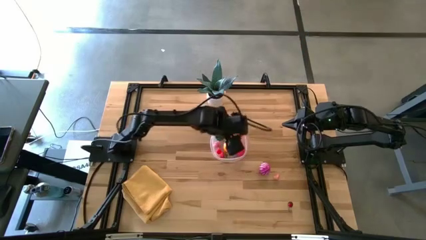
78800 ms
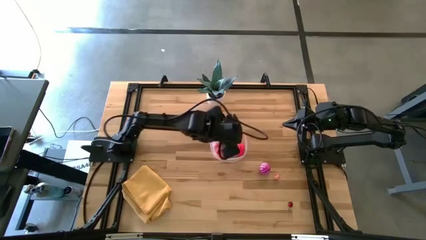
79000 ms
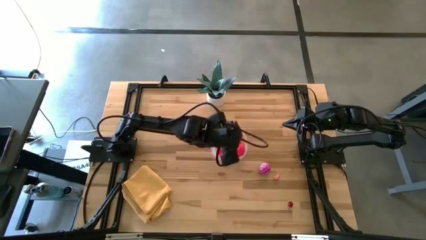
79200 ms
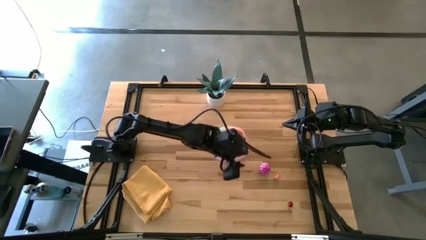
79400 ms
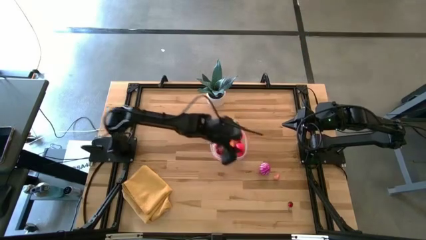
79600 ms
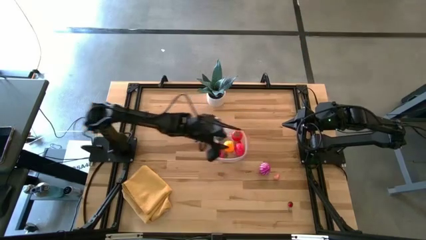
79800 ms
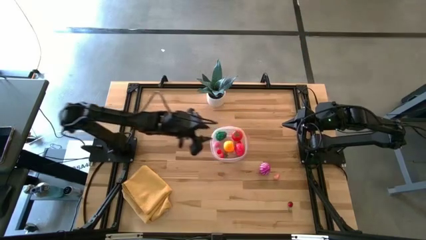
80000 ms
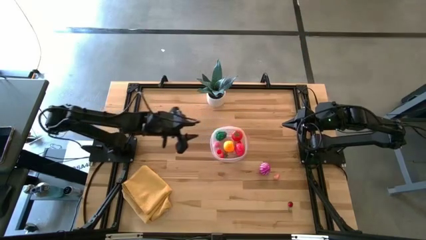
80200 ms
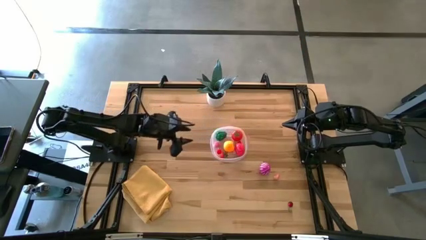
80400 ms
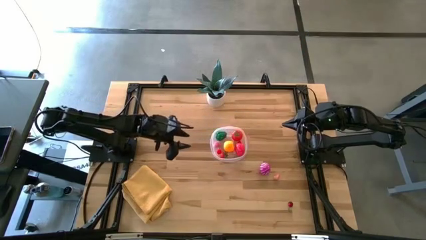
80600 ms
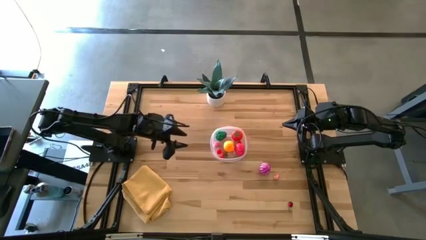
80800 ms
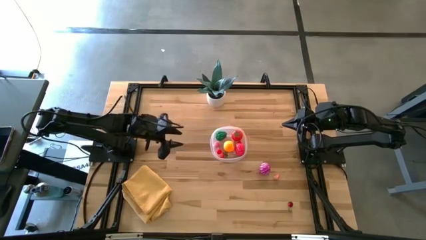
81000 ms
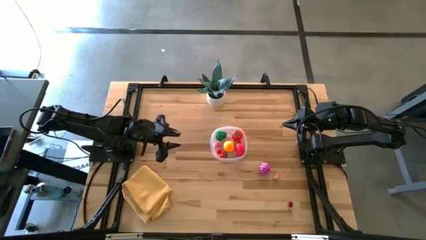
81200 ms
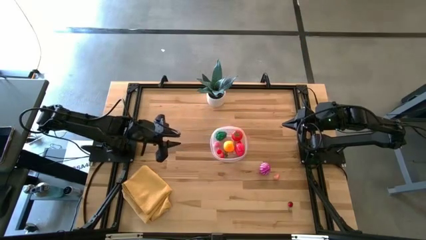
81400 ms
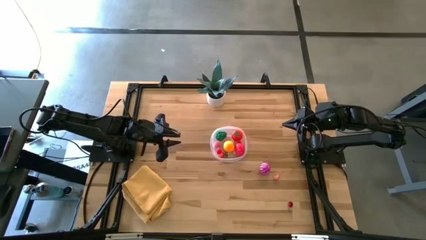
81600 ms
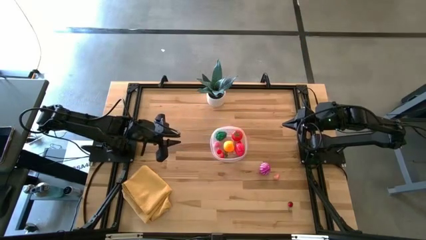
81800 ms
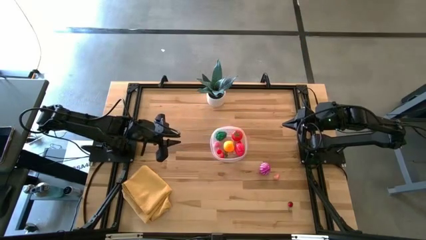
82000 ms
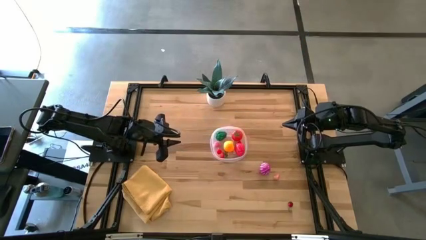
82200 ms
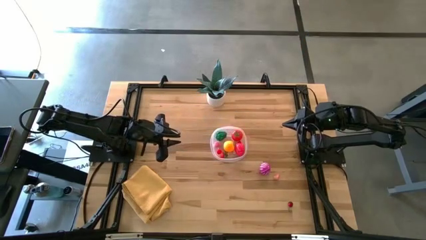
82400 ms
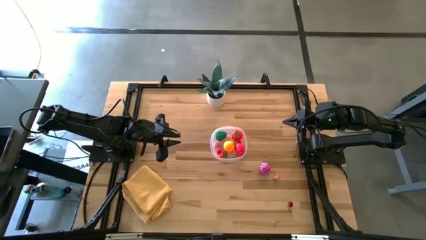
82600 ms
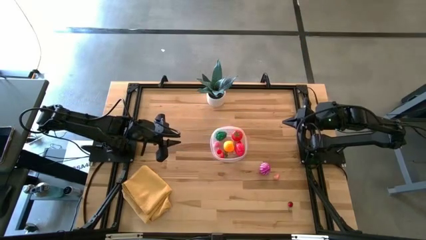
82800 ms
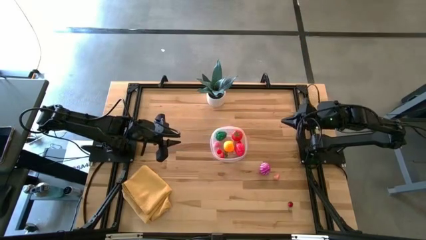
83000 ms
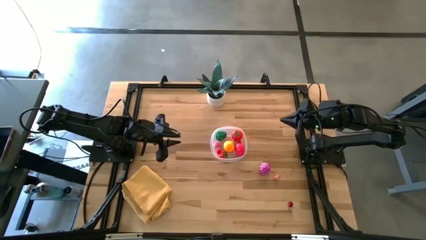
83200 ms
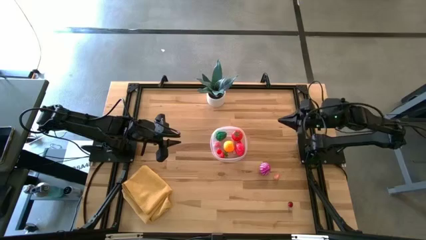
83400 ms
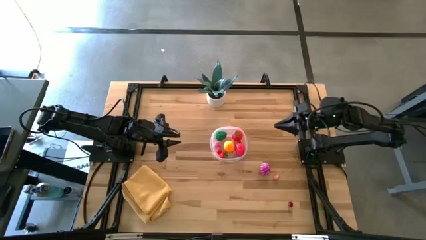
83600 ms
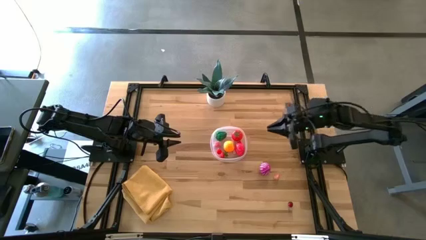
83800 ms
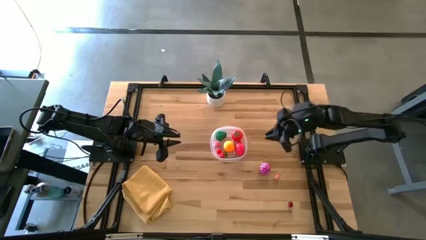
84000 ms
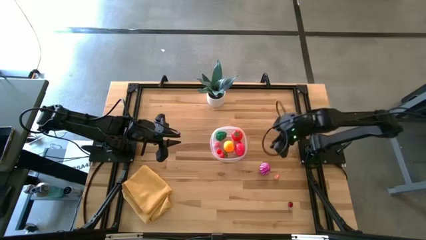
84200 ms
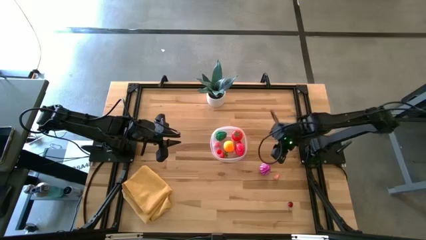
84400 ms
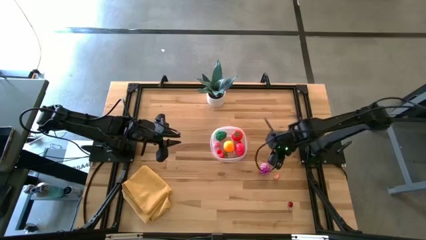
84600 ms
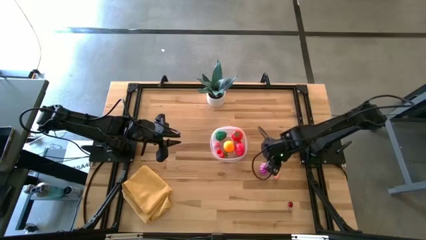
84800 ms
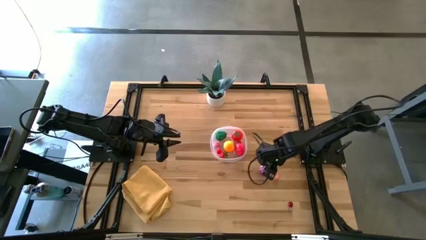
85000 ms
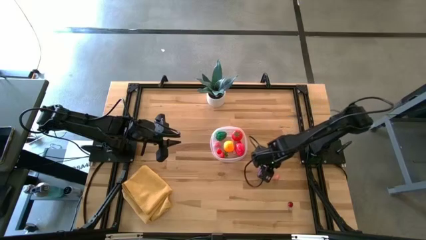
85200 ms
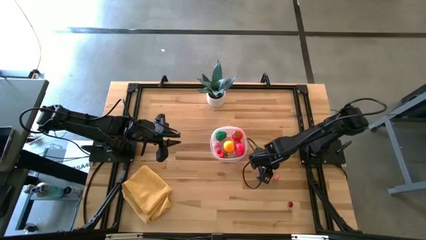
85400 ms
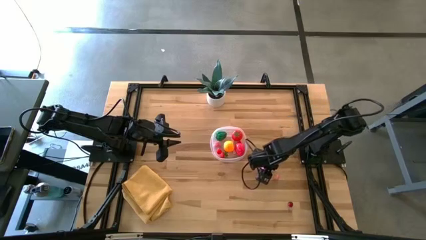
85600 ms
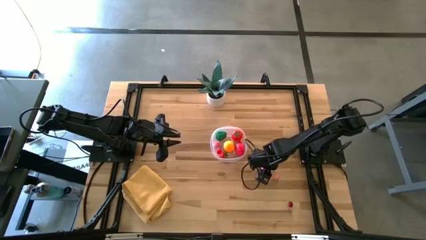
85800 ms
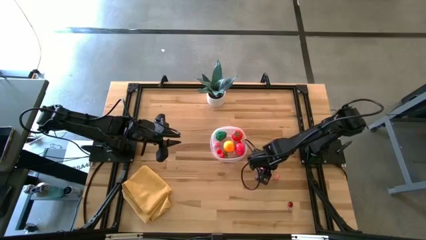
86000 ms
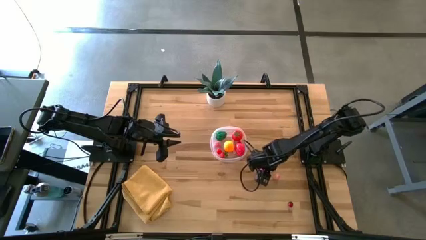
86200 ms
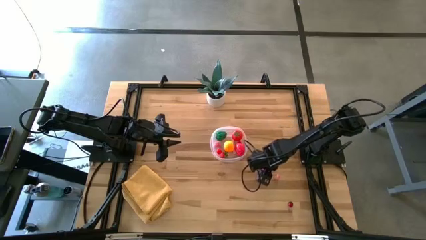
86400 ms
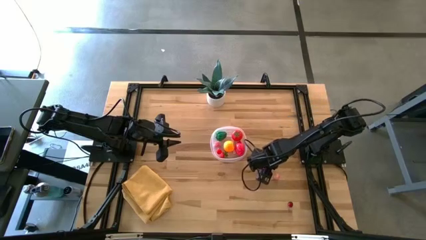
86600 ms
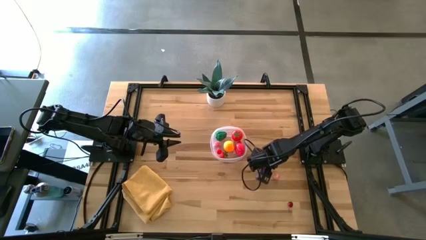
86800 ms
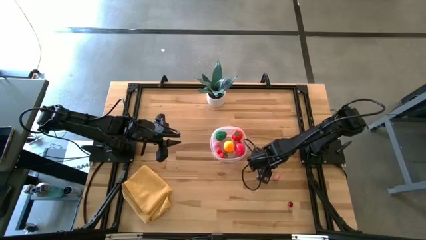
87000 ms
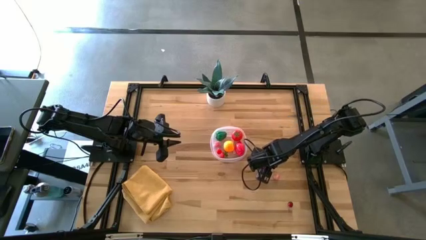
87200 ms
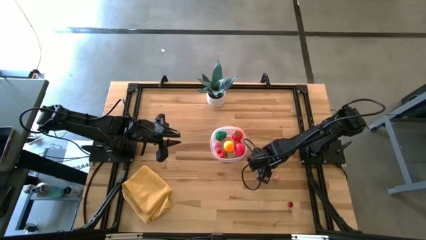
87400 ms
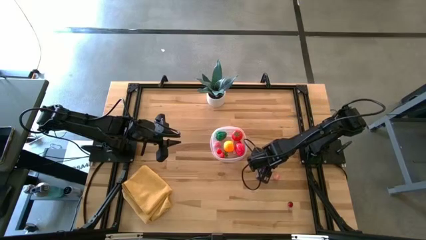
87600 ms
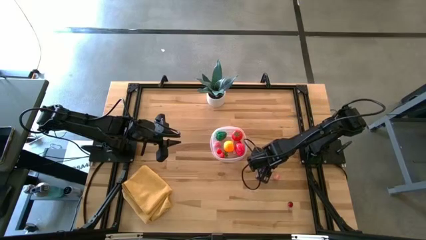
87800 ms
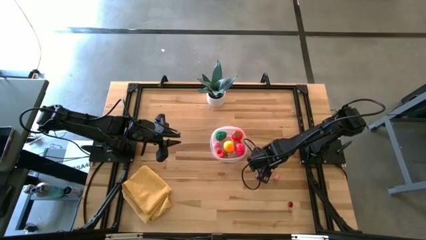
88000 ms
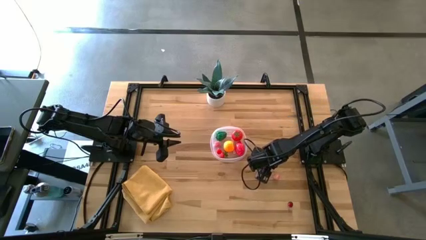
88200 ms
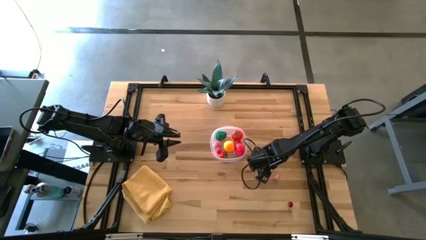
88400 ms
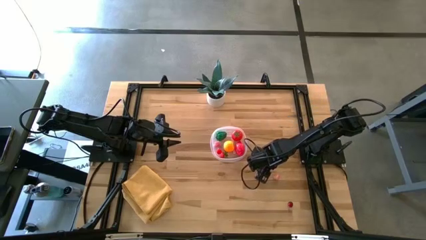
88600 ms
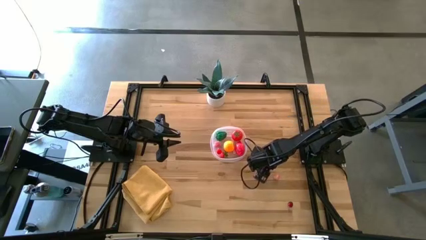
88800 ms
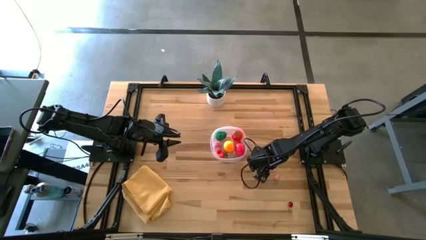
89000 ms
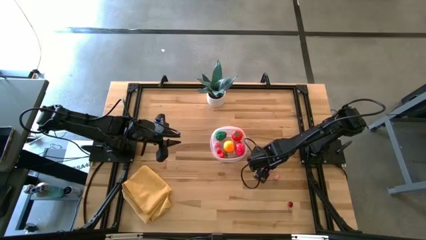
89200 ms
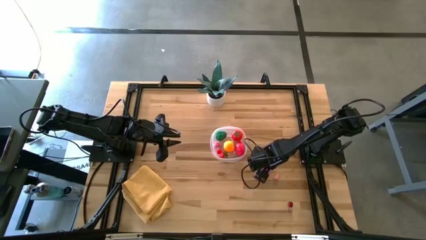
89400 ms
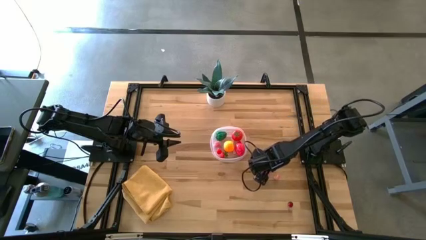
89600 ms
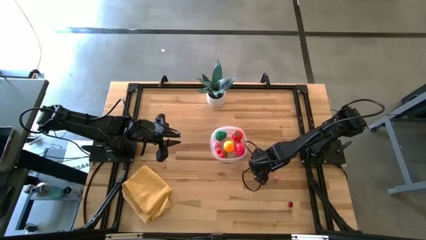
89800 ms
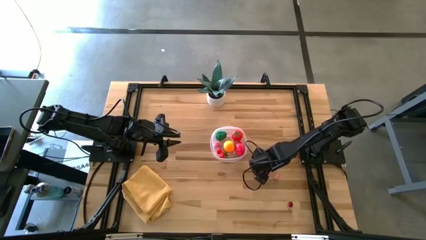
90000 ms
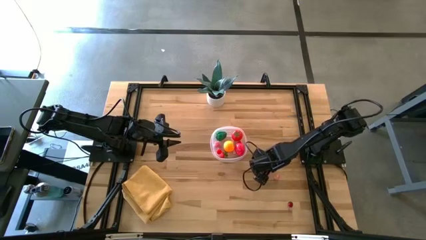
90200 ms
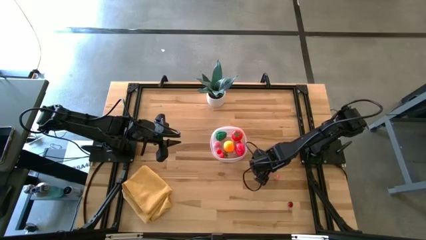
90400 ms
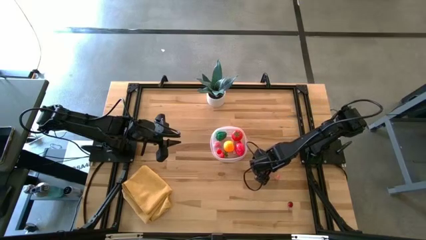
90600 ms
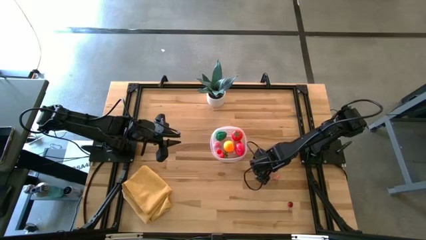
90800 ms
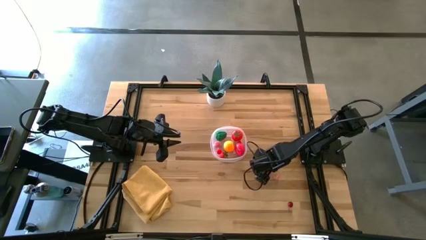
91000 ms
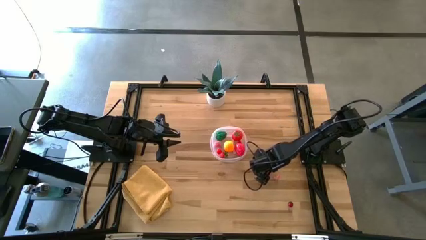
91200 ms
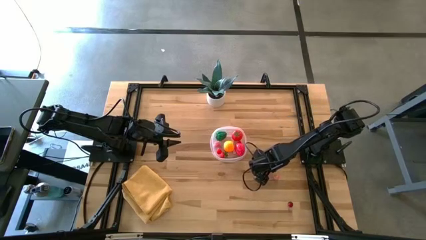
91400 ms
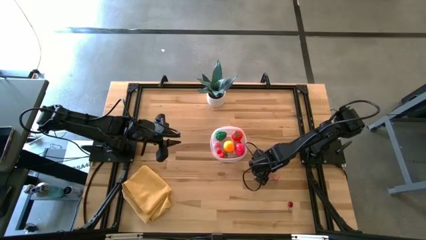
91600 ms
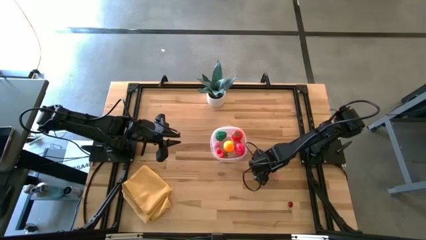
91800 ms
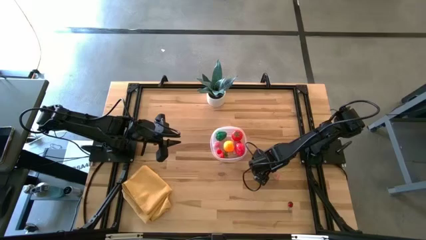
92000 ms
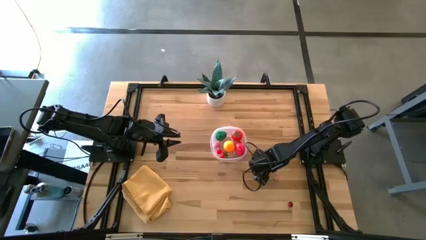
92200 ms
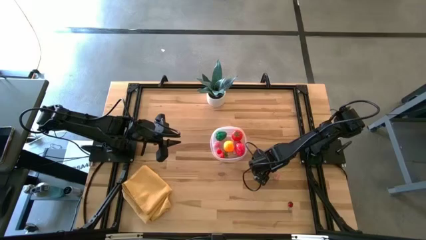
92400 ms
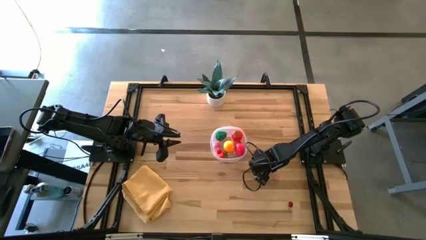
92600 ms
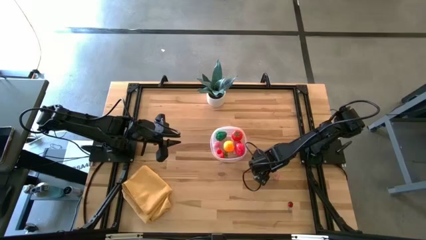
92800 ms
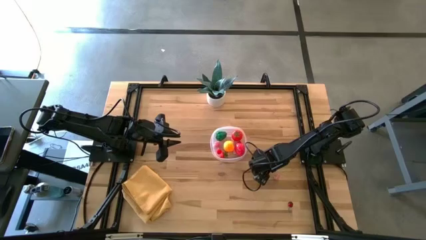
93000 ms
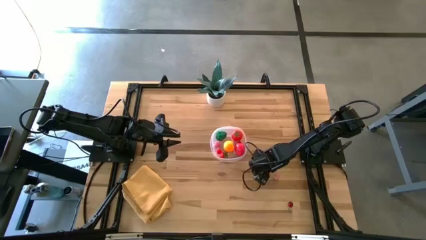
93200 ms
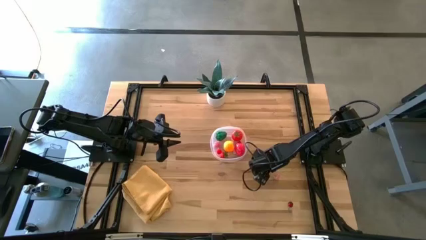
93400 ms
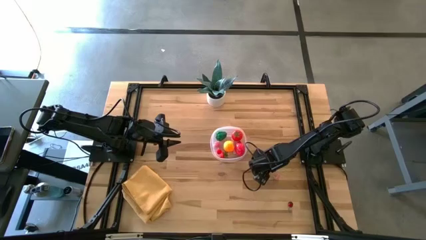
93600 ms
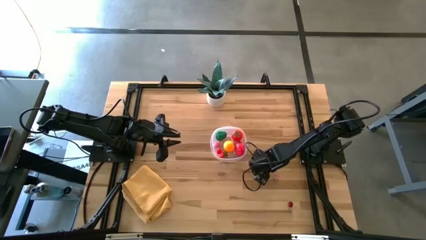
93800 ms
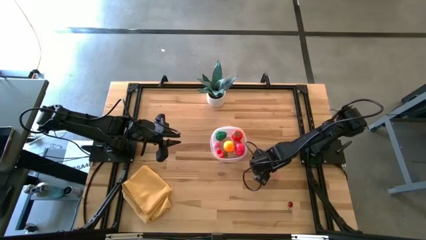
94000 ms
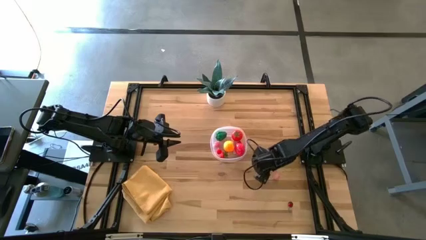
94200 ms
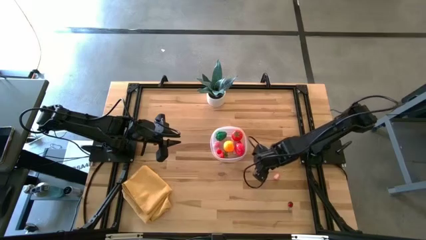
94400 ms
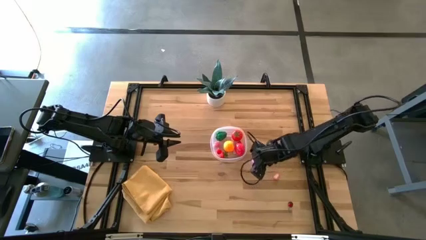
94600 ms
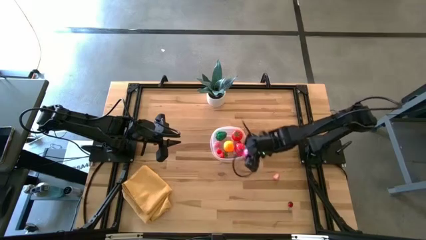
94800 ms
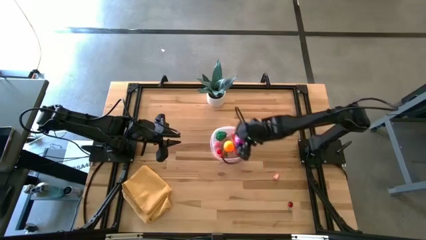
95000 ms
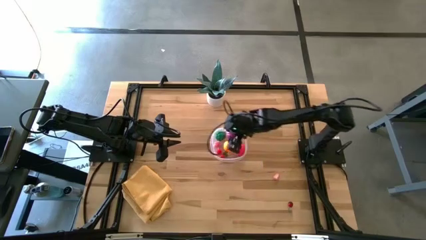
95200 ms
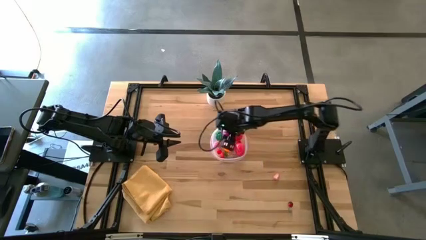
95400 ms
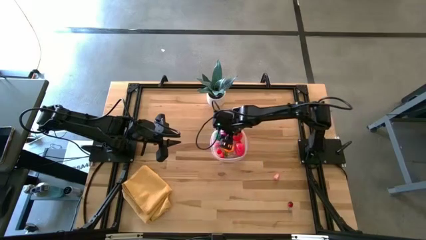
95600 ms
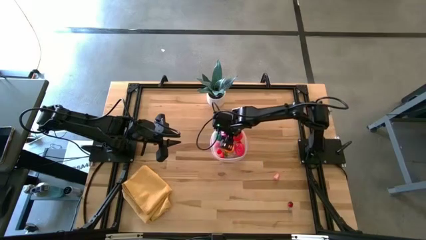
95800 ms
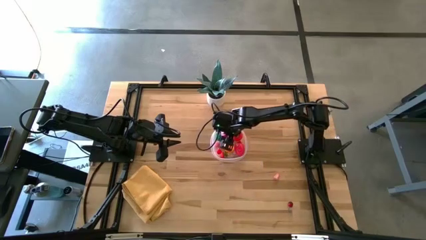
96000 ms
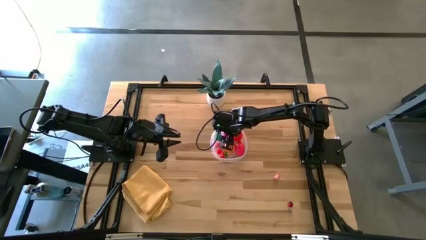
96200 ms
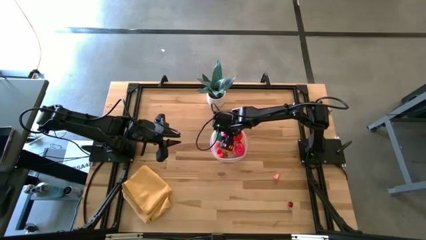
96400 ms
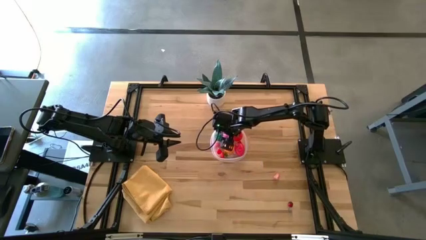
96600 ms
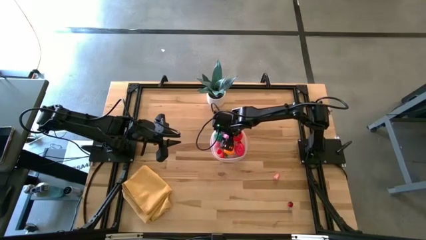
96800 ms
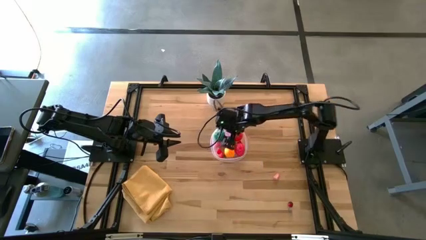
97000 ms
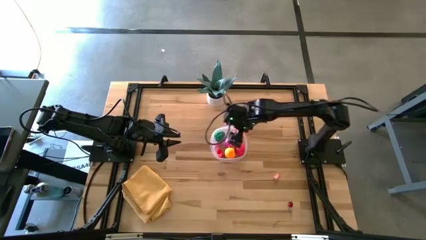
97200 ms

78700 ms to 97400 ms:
Task: Pick and placing Produce into tupperware
Put the onion into the transparent bin
